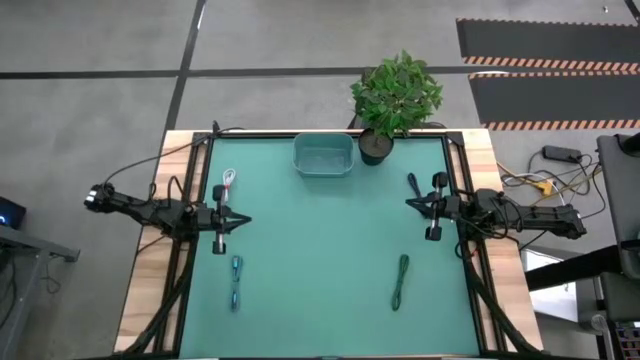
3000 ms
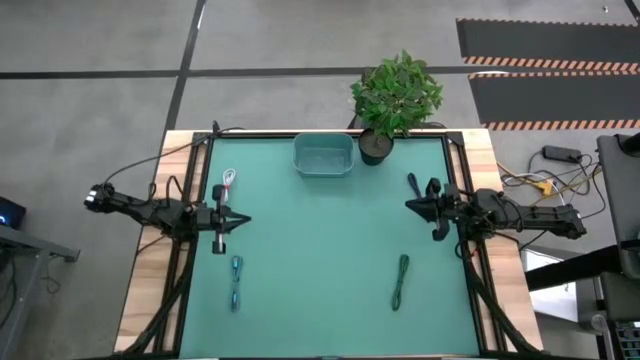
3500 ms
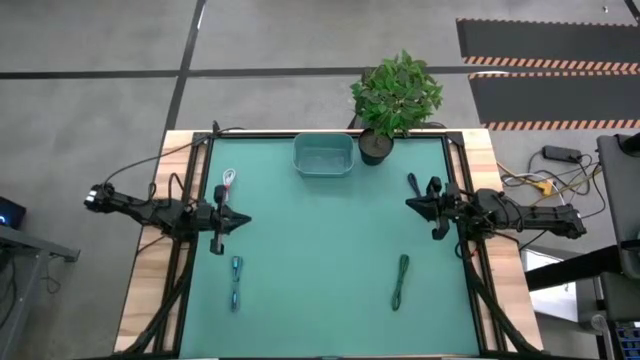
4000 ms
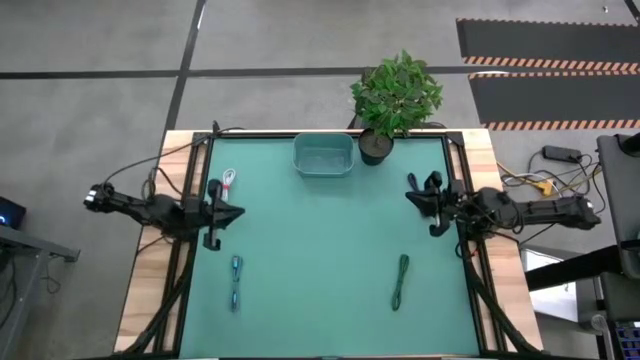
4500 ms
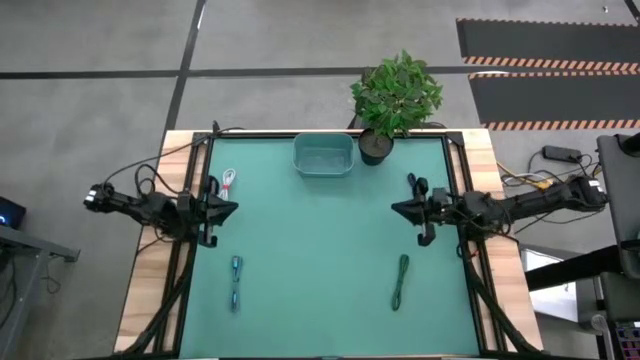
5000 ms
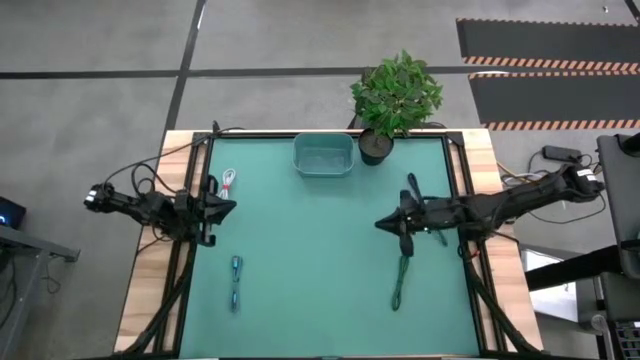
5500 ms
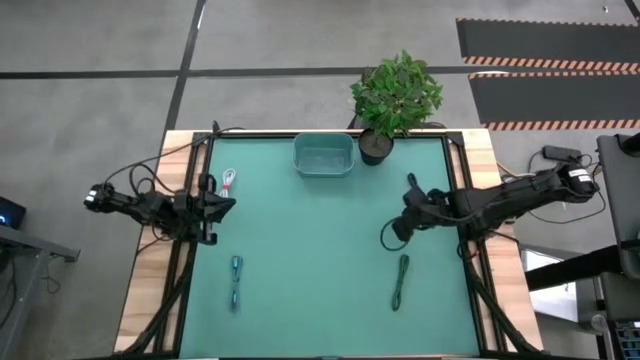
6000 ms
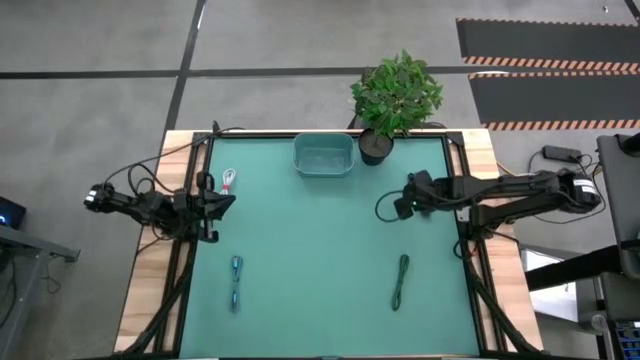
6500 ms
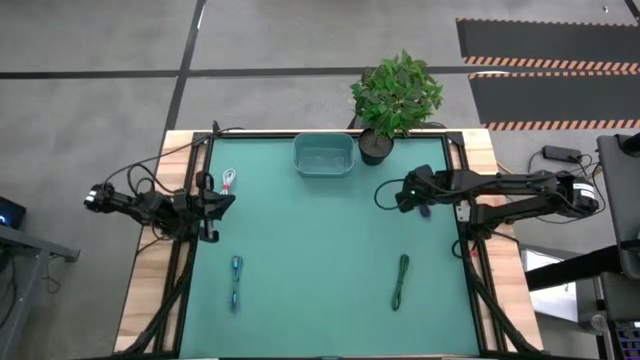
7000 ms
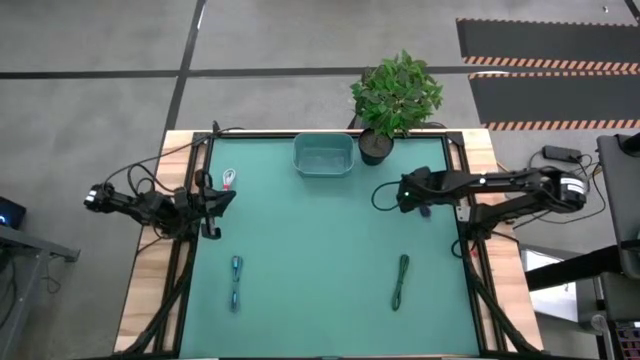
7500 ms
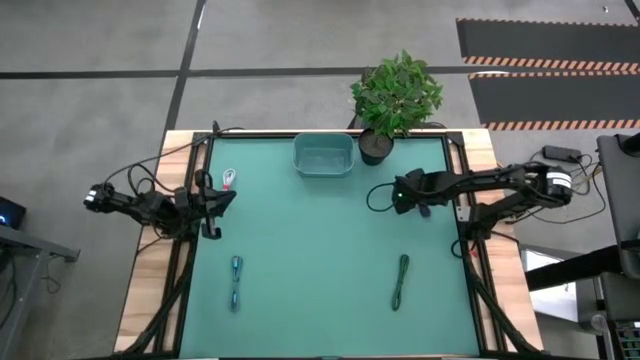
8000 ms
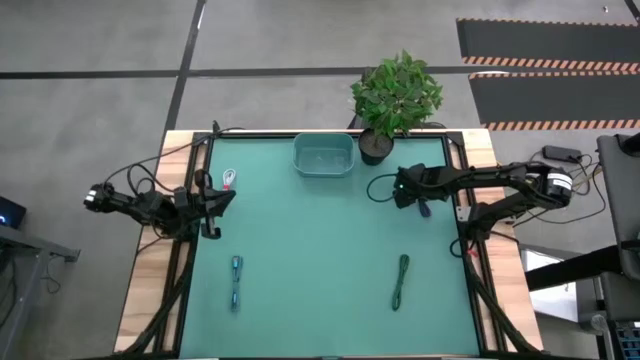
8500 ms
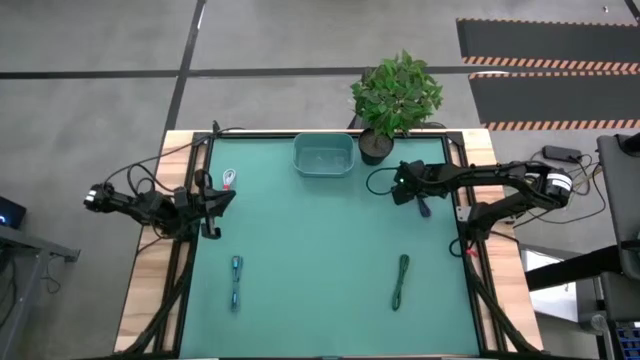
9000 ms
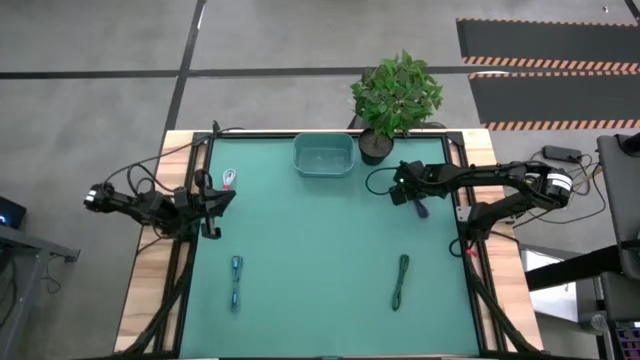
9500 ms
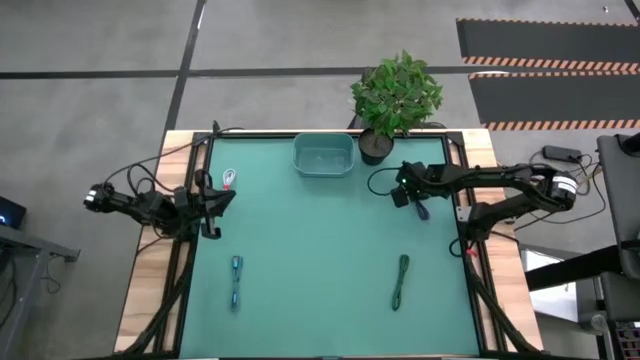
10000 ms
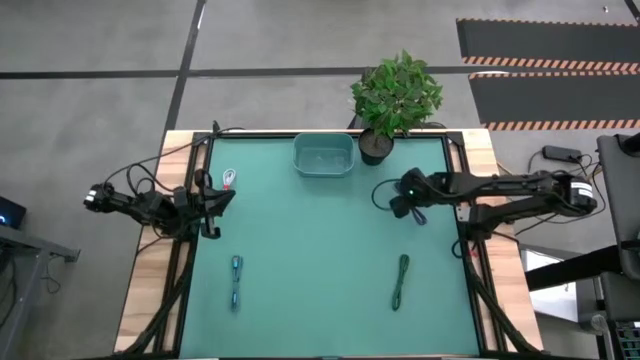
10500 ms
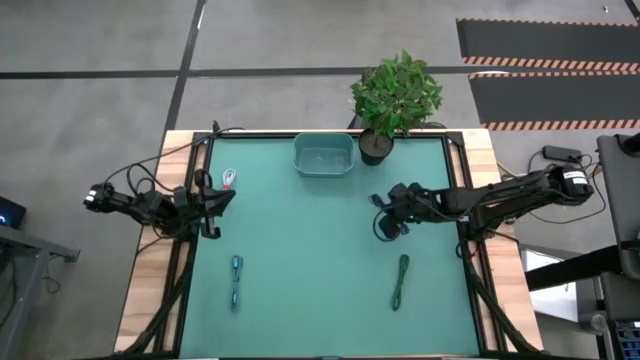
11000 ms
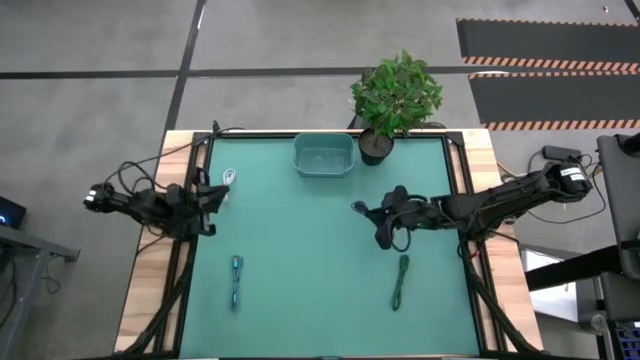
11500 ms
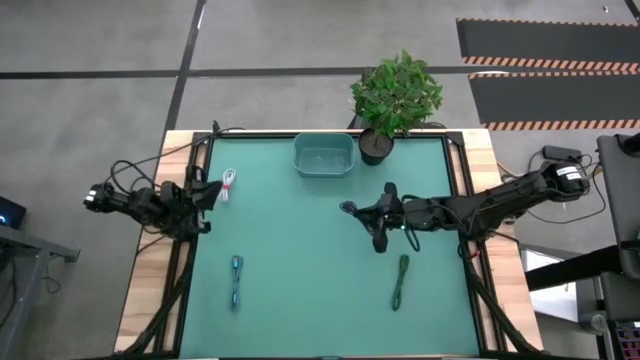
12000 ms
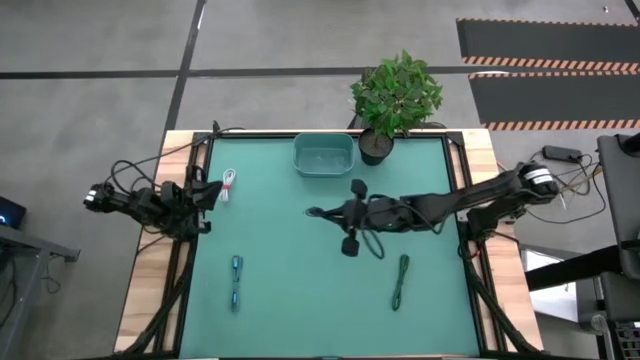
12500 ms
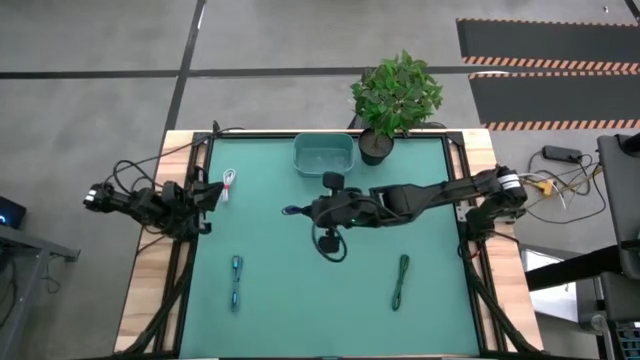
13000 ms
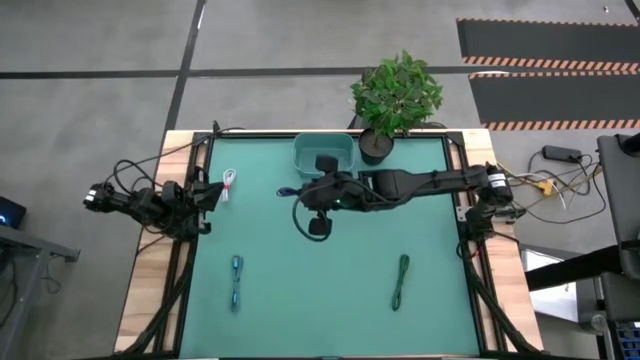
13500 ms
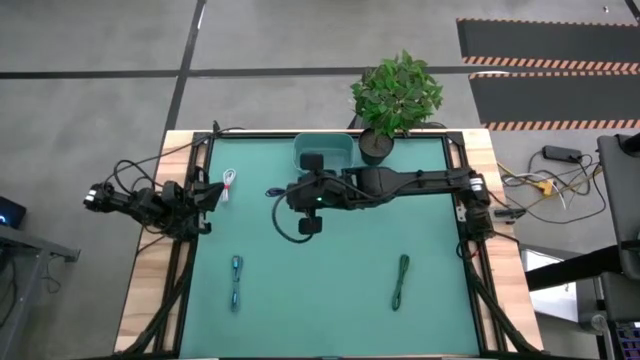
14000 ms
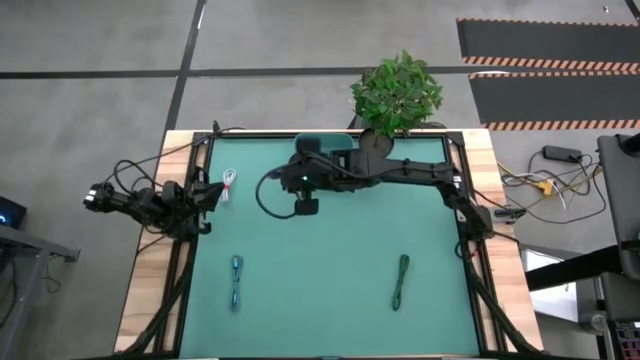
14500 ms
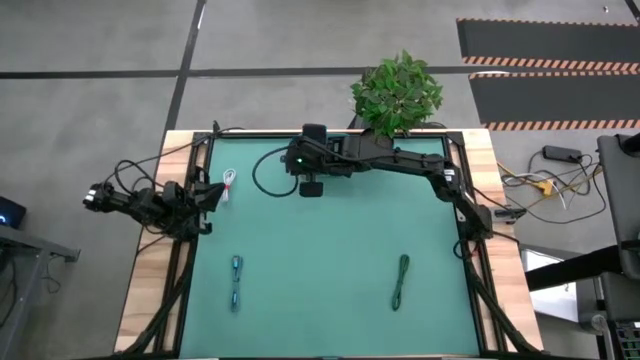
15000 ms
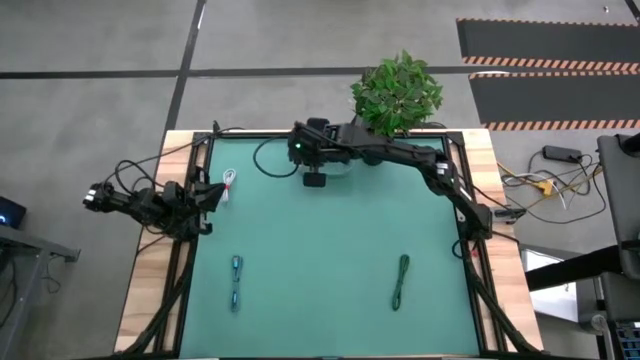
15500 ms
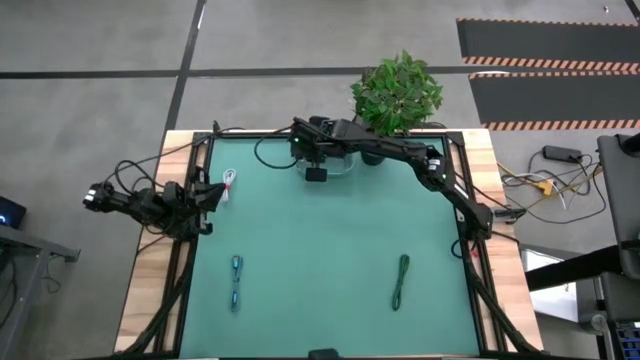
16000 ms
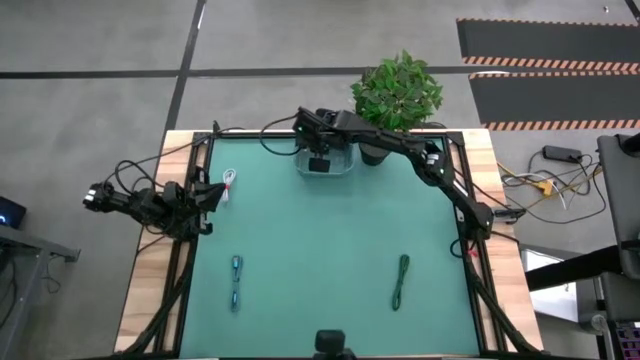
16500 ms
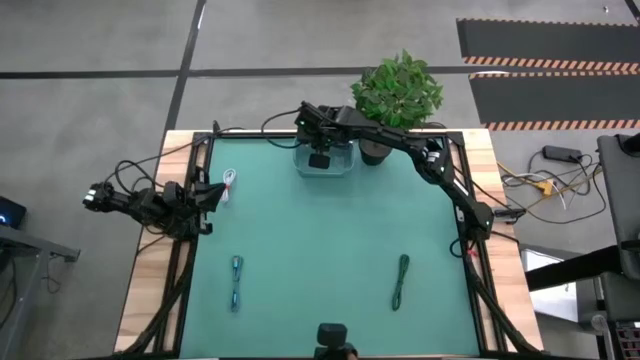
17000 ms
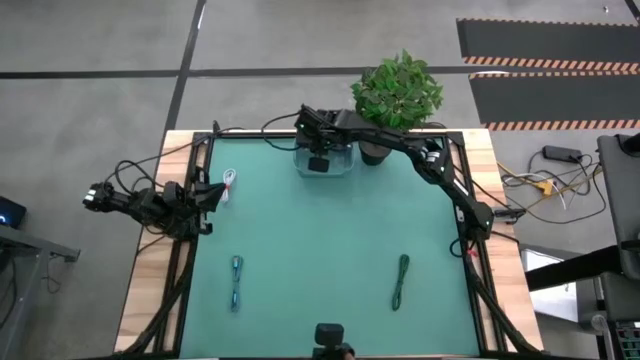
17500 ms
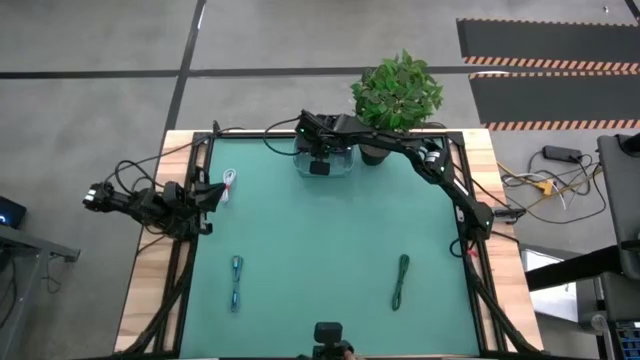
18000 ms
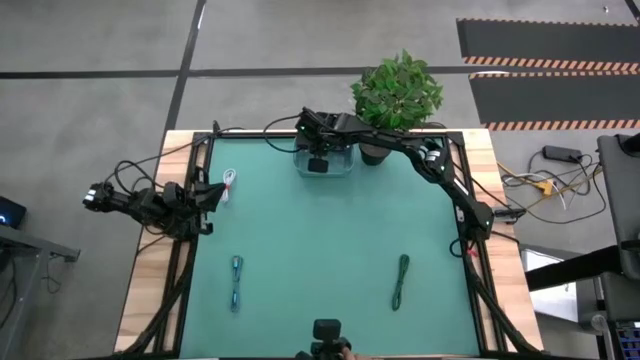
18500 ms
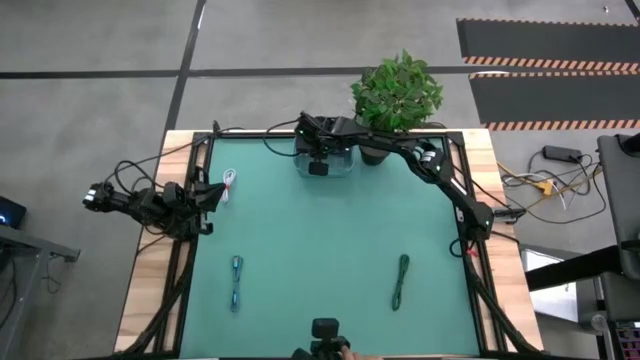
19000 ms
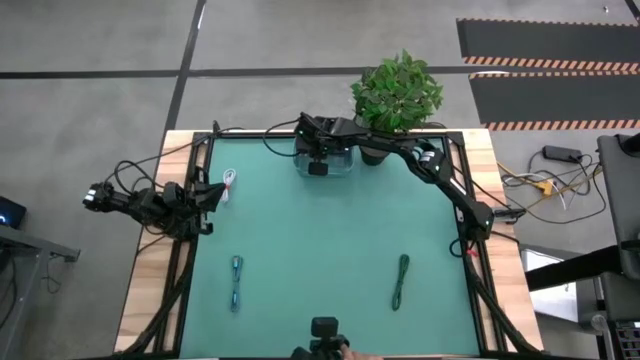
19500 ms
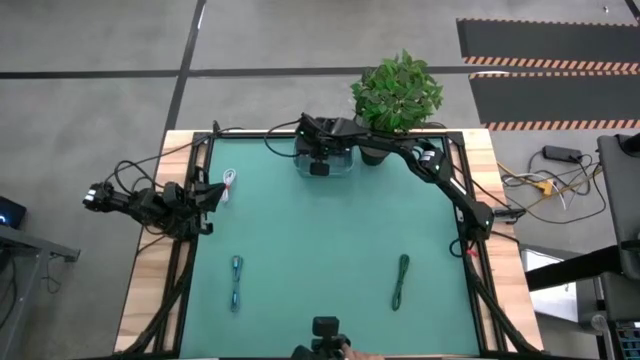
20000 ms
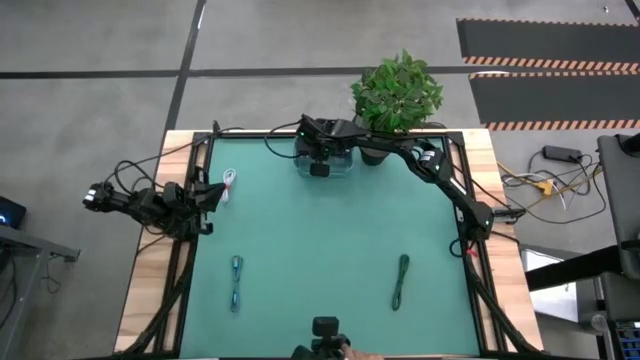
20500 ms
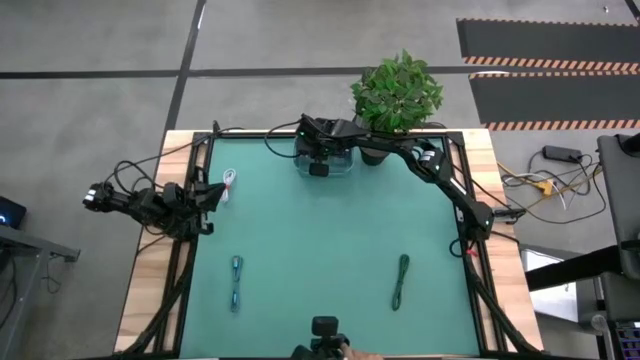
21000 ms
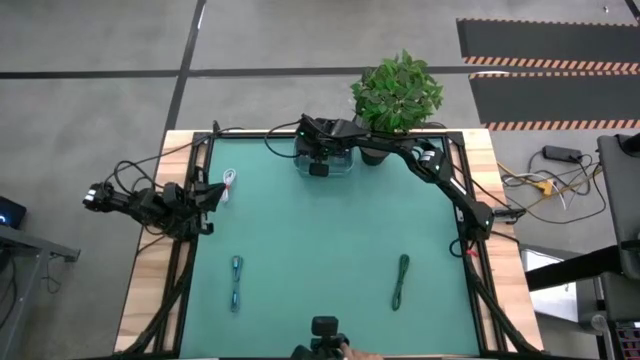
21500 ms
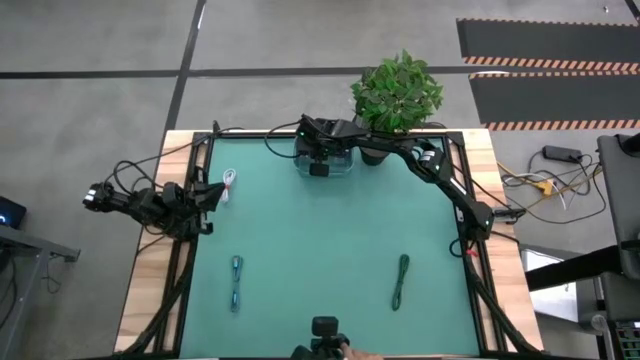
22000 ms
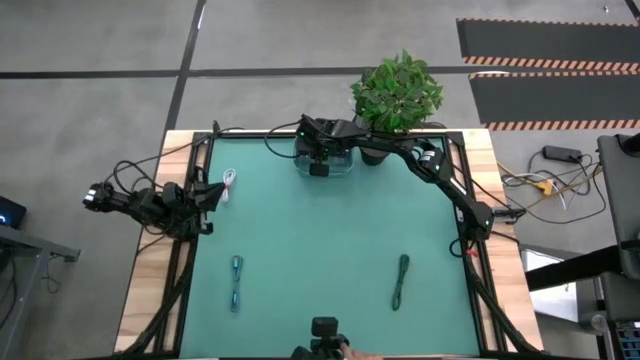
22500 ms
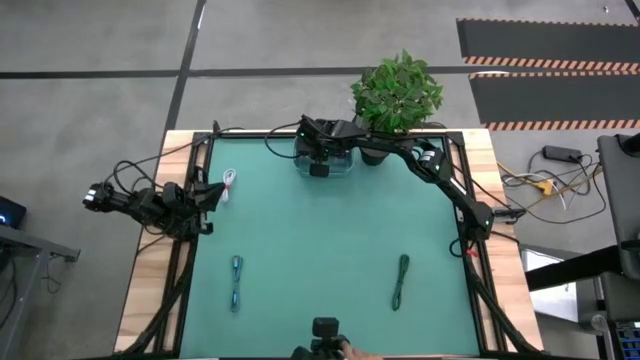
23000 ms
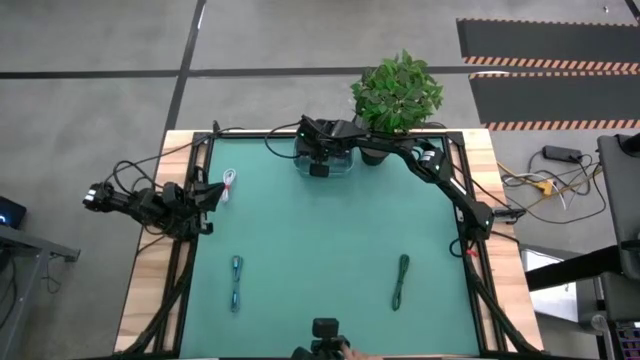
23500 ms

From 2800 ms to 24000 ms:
Task: Pick and place USB-C Cables
Put the purple charger cable into the green bin
